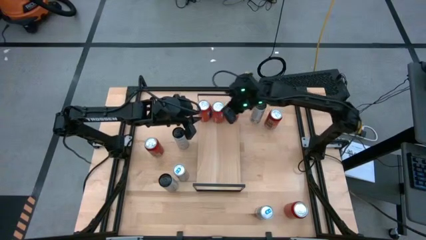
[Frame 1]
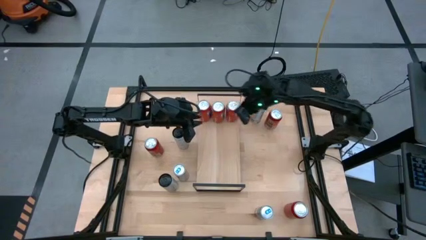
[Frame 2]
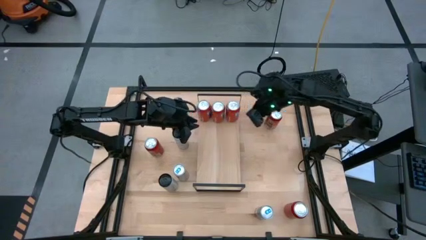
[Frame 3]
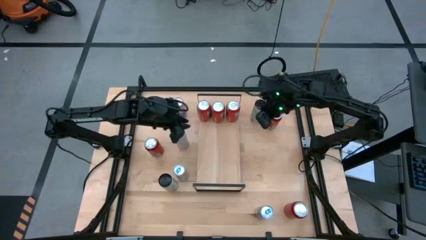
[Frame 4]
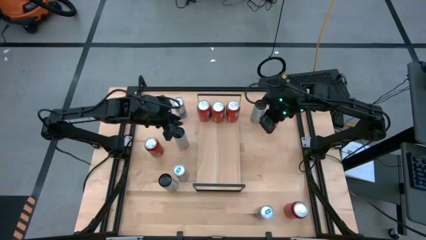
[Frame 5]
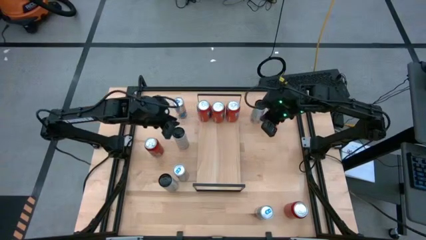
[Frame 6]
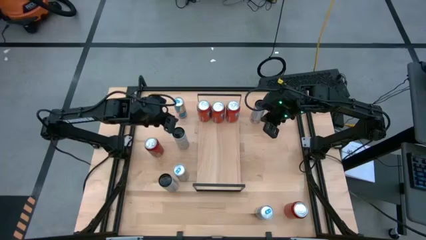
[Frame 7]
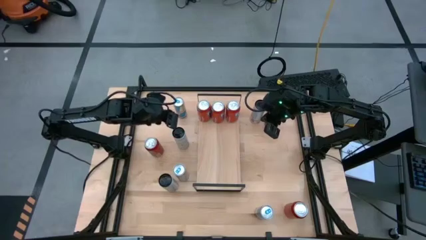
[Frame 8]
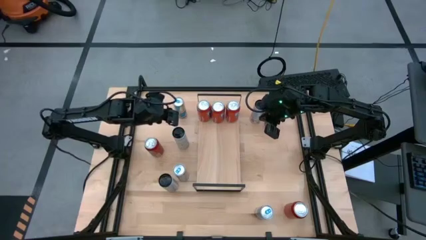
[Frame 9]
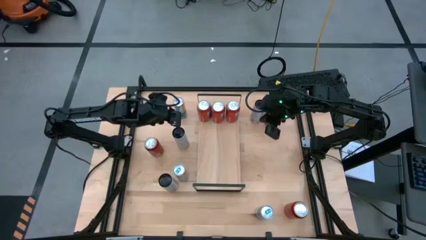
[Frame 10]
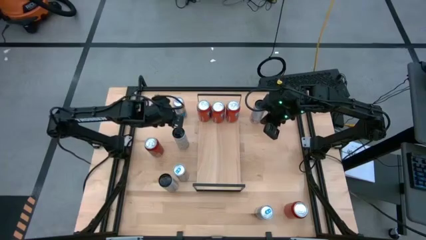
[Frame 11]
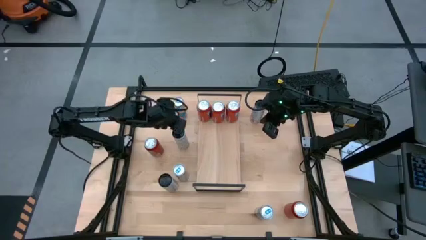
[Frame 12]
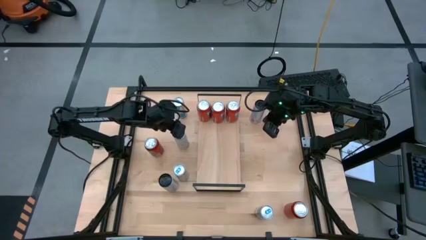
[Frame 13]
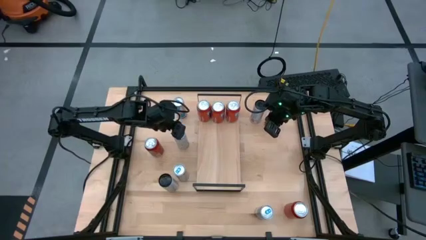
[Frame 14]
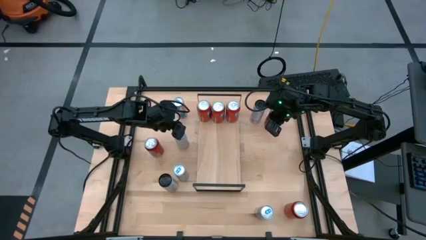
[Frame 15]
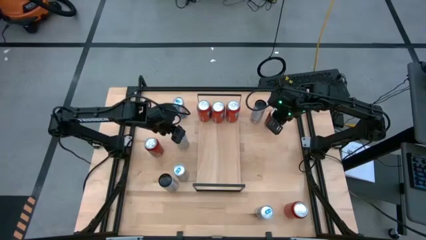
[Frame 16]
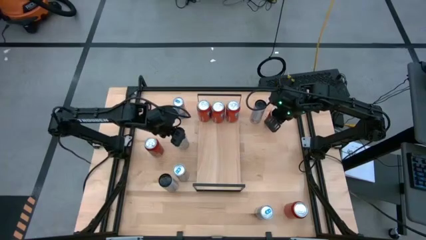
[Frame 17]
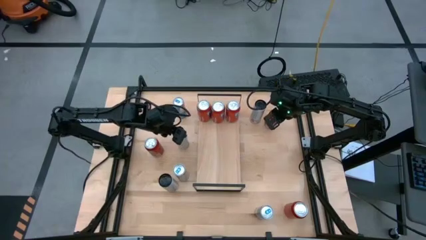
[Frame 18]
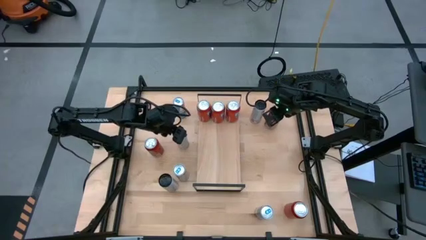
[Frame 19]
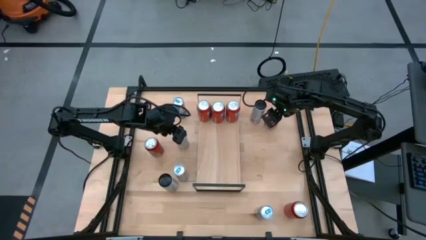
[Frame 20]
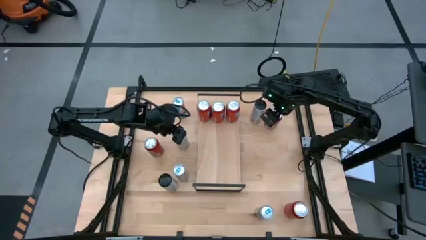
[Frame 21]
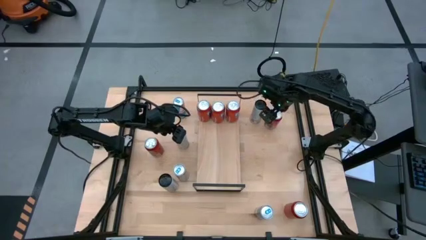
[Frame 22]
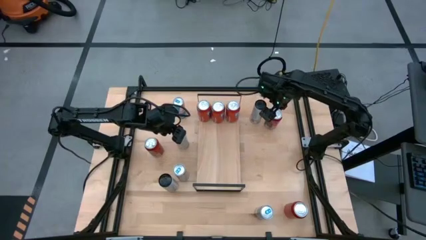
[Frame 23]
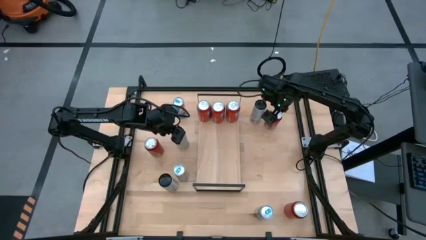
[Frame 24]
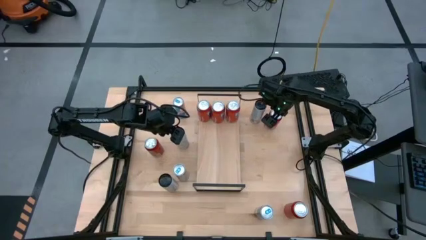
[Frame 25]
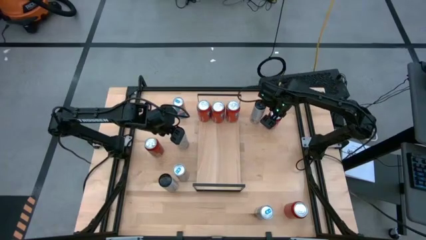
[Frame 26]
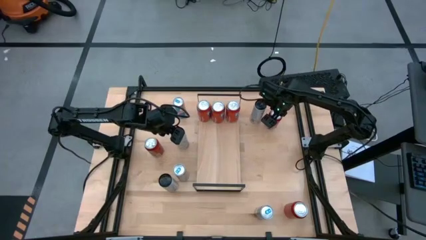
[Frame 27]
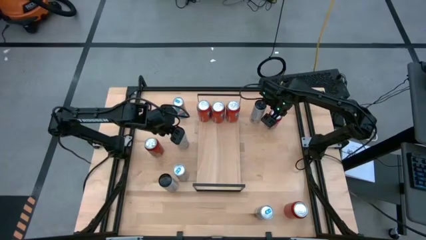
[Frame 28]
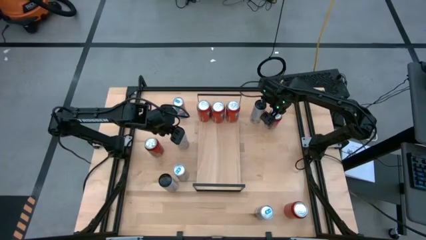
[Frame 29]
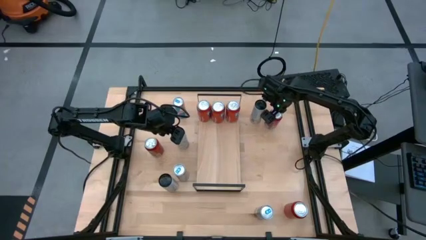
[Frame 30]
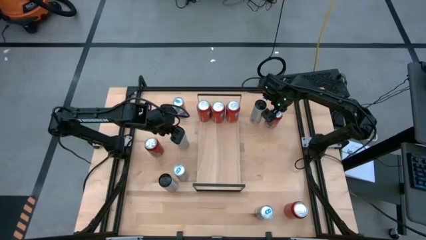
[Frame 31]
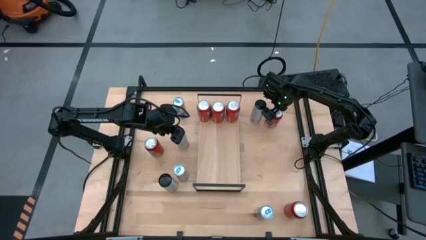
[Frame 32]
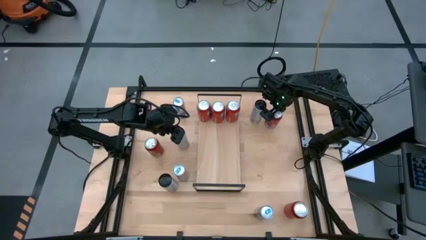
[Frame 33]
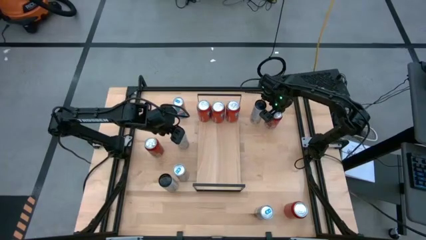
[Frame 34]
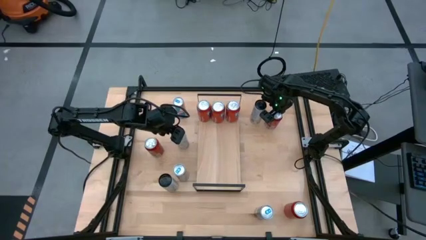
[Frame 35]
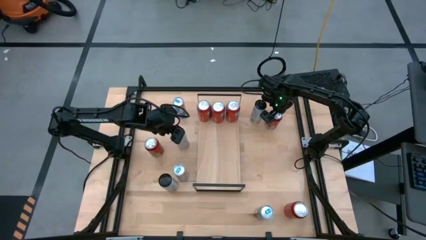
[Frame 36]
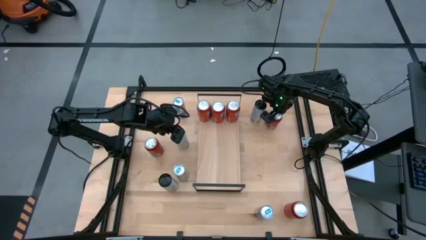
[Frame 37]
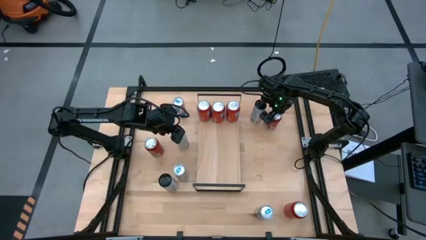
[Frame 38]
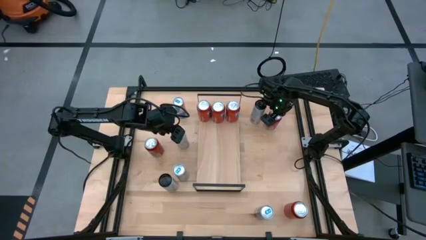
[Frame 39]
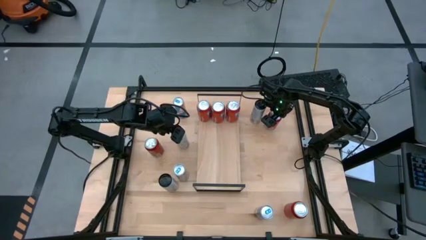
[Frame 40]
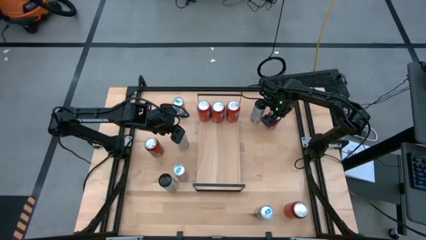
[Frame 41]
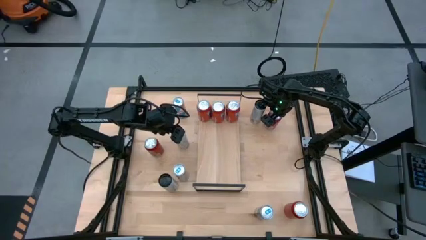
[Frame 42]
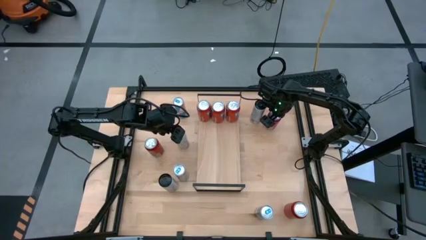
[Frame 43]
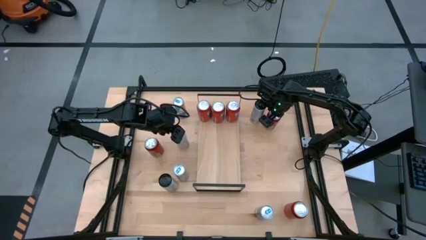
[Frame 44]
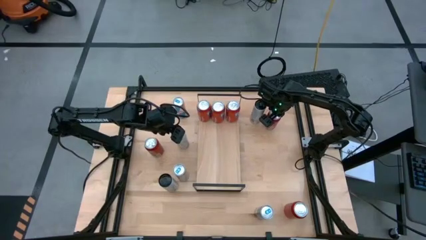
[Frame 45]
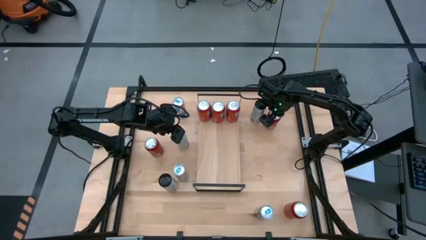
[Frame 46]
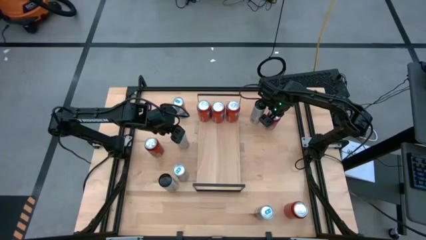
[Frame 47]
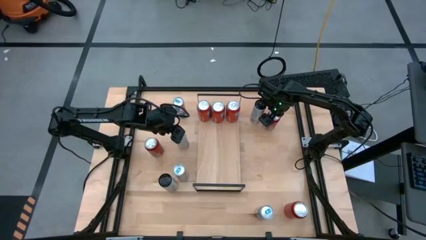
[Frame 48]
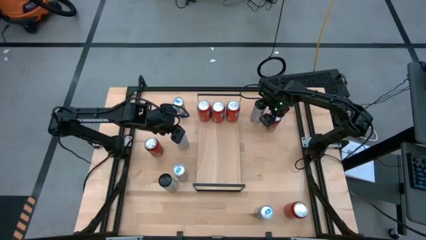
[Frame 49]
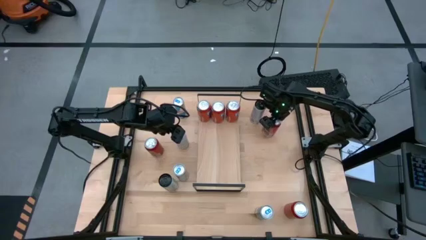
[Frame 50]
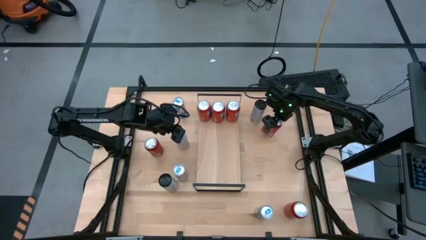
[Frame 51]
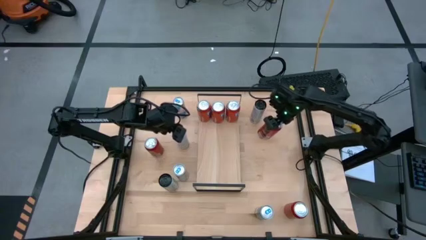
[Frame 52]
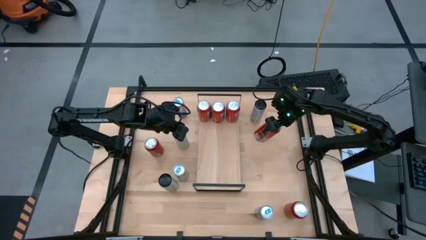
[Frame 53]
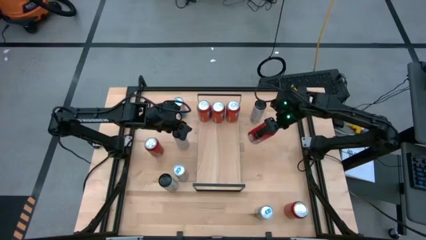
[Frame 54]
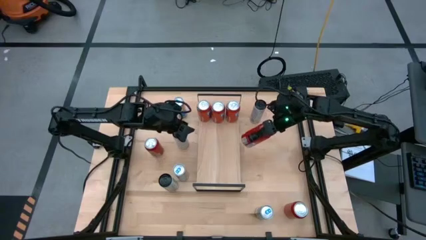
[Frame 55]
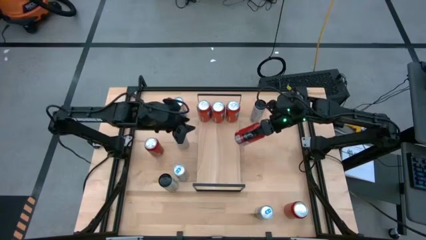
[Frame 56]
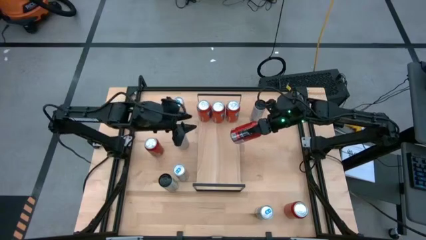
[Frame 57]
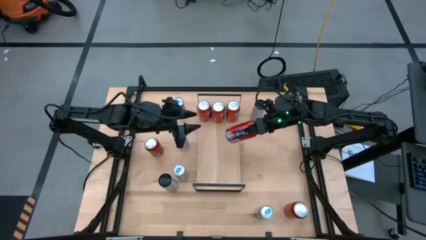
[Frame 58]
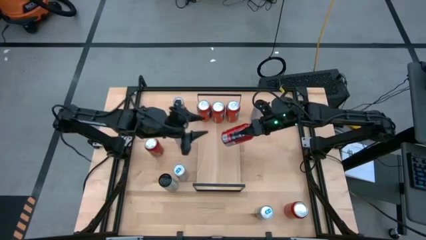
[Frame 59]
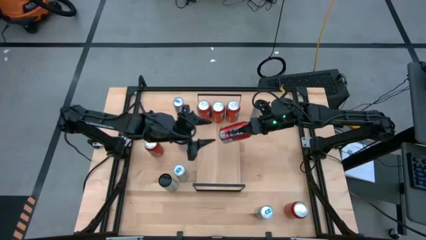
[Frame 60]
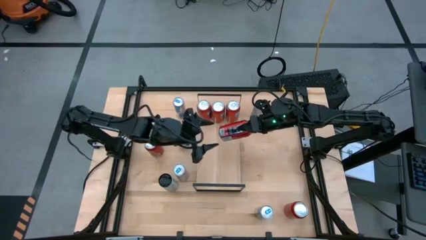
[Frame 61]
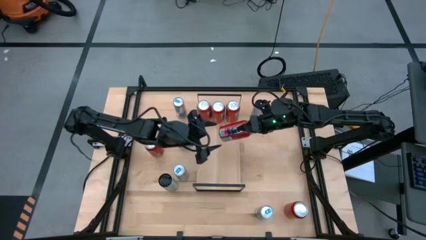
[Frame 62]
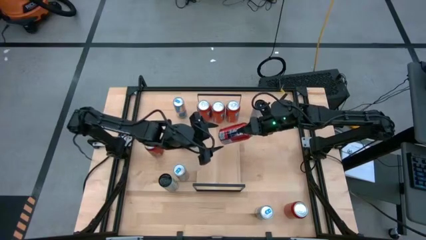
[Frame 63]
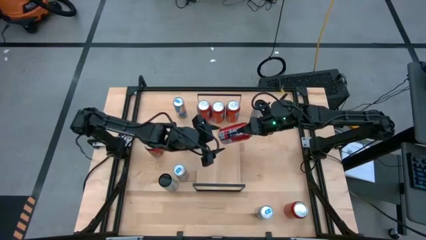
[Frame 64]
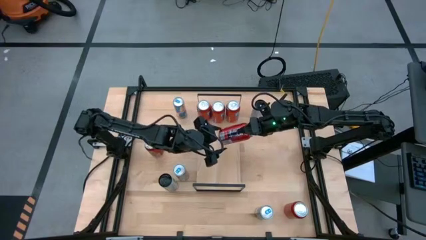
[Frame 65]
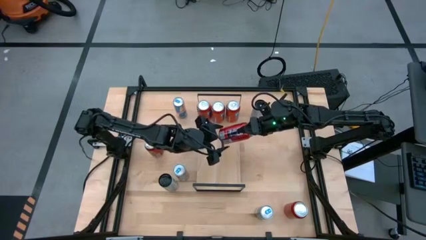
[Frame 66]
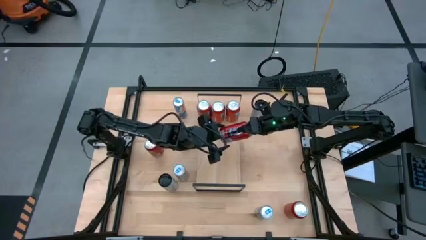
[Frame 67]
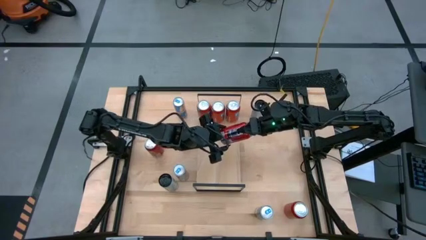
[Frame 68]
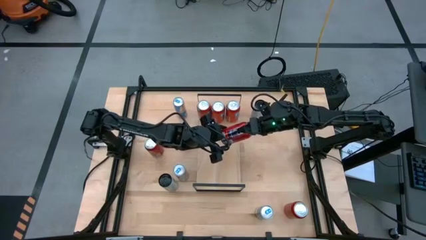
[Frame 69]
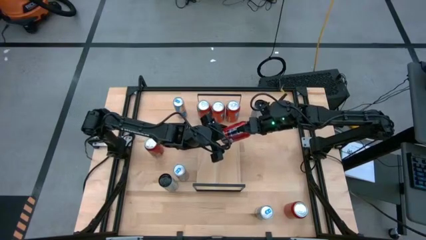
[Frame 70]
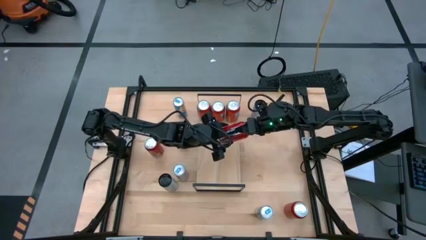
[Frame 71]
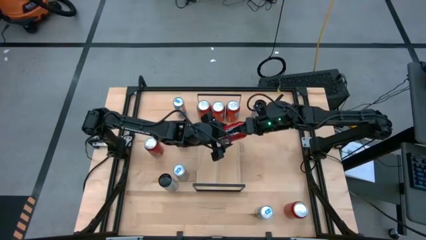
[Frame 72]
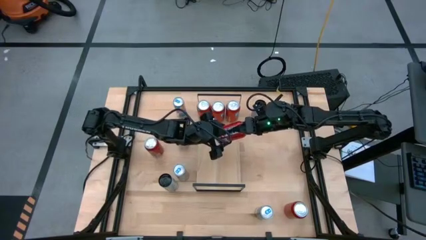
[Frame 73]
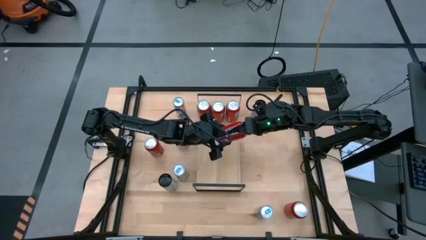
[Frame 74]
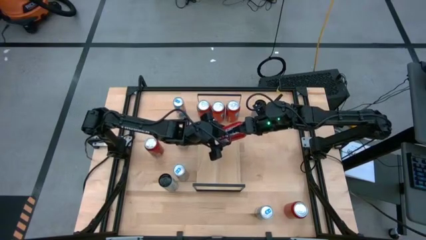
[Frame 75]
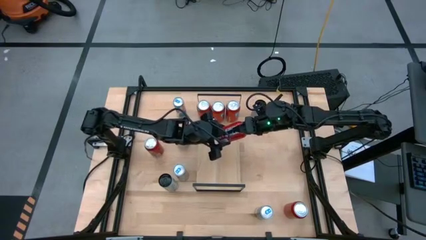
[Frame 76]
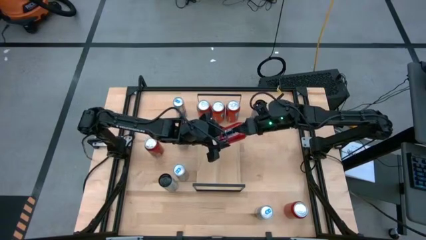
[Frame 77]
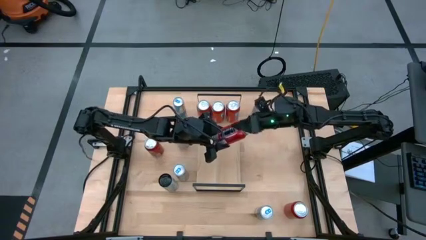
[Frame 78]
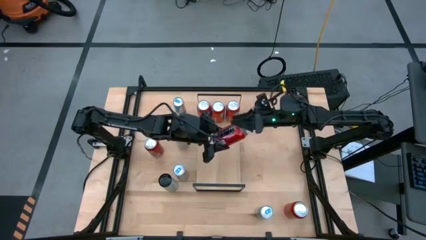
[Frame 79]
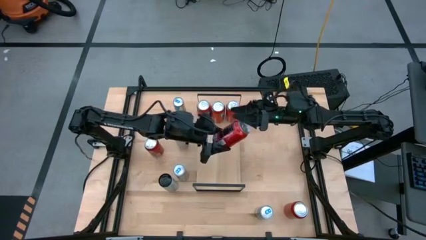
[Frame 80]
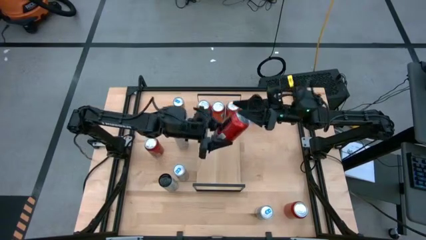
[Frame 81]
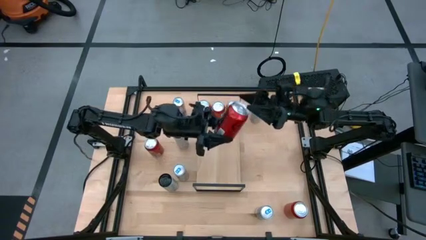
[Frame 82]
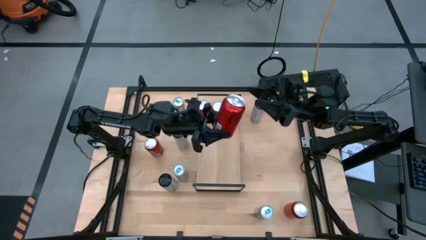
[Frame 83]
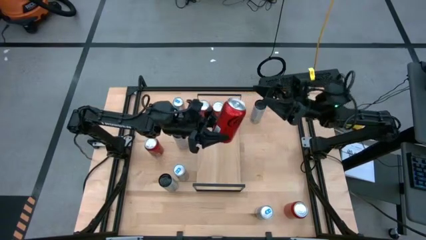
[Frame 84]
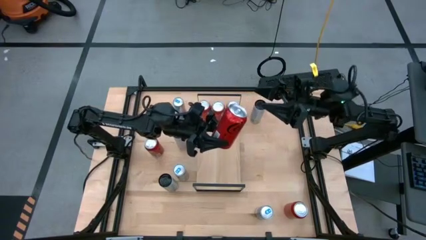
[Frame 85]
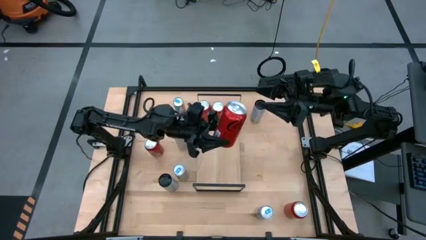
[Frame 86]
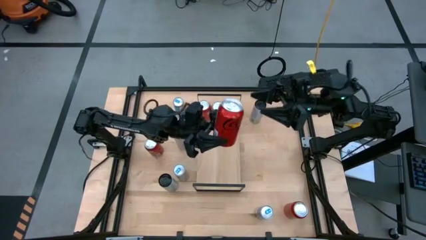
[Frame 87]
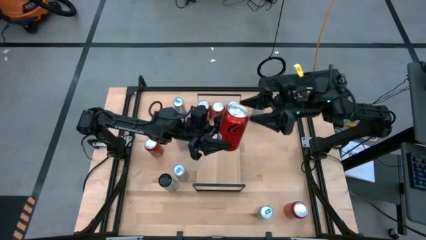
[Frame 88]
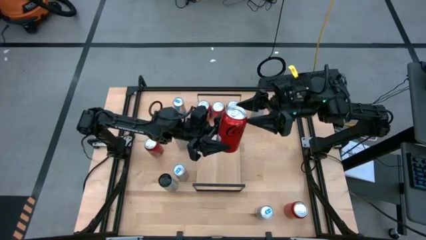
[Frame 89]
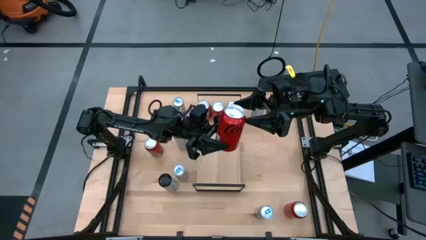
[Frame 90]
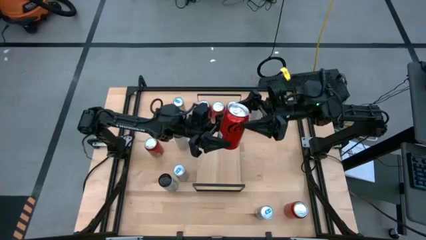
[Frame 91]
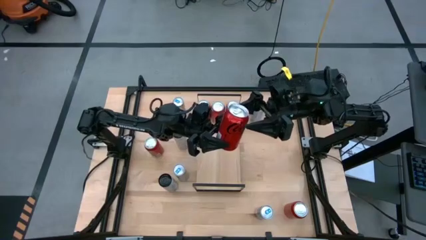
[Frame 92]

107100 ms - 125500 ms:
Task: Place canned beverage on shelf
Put the top right red soda can on the shelf
